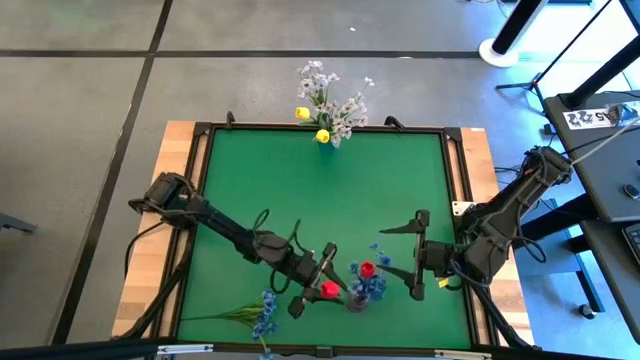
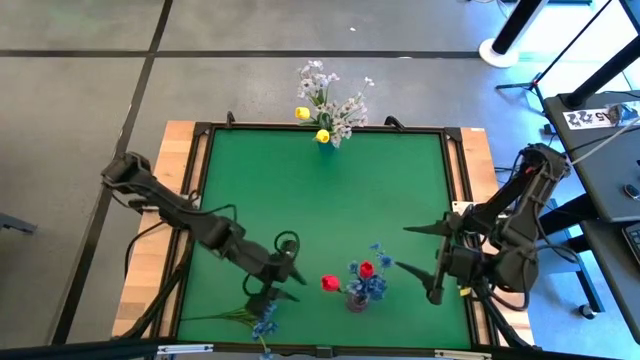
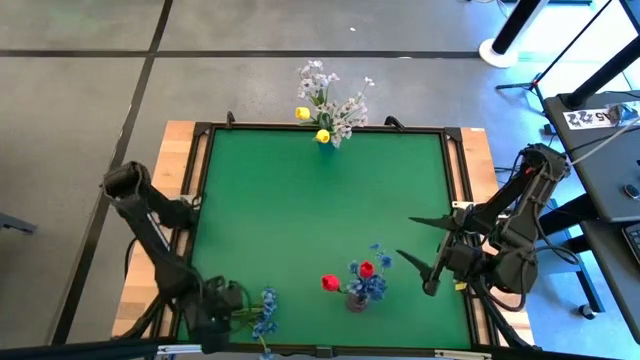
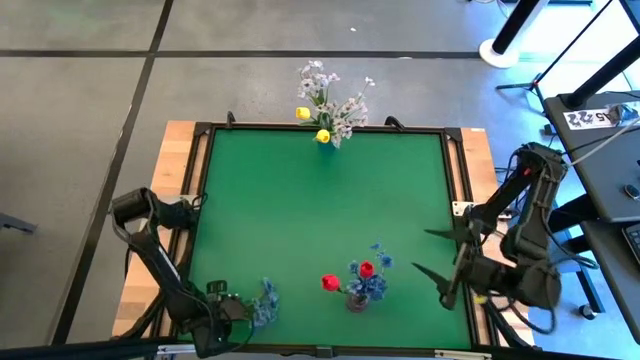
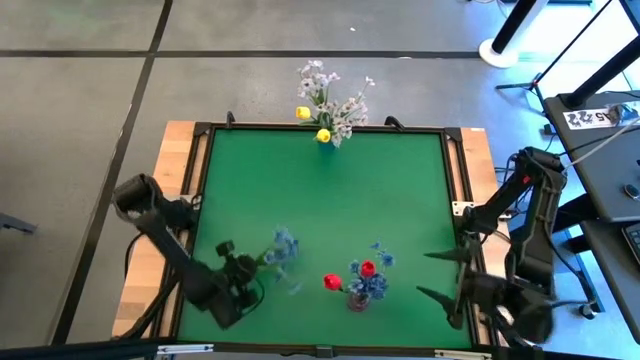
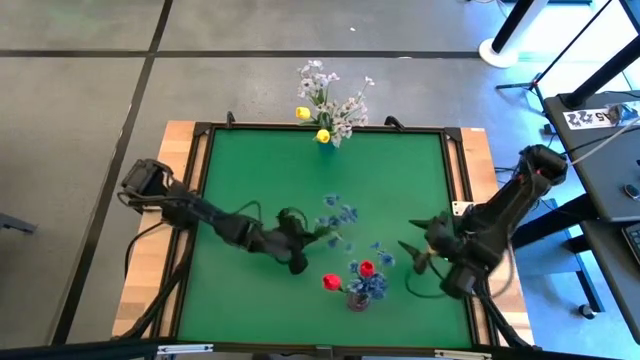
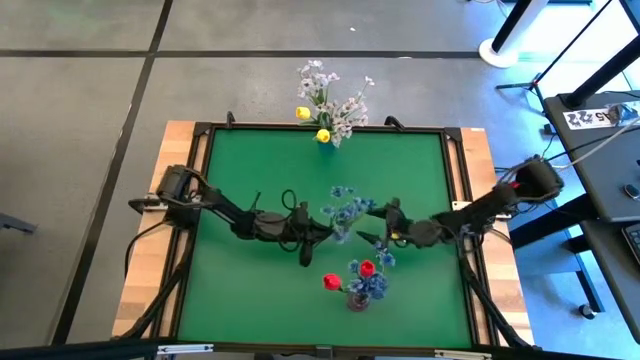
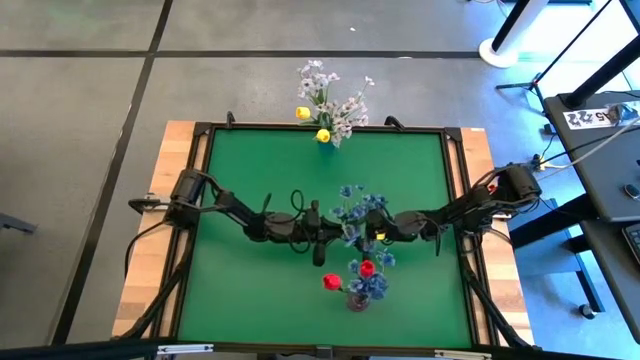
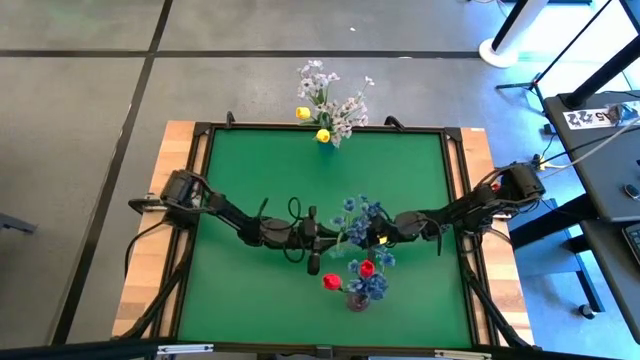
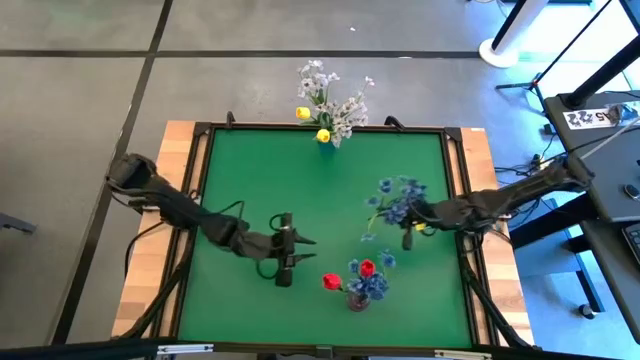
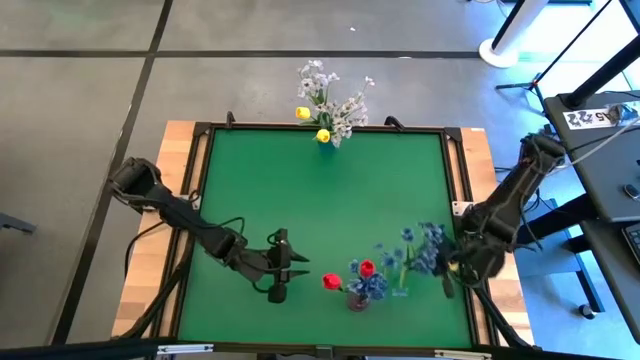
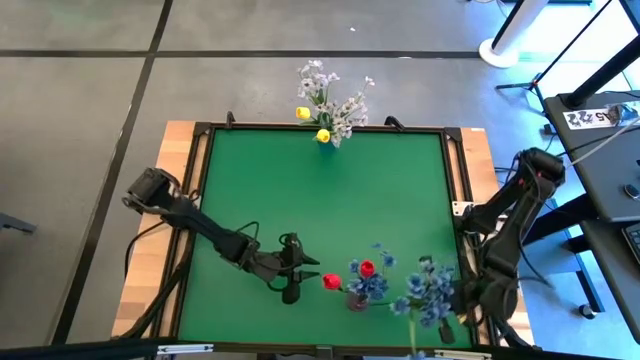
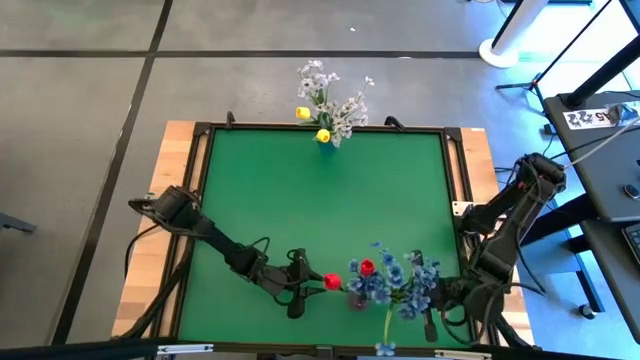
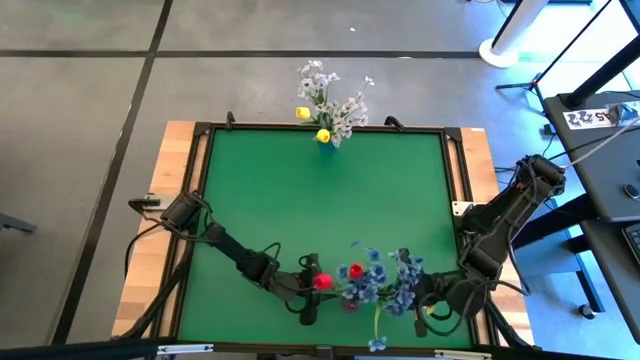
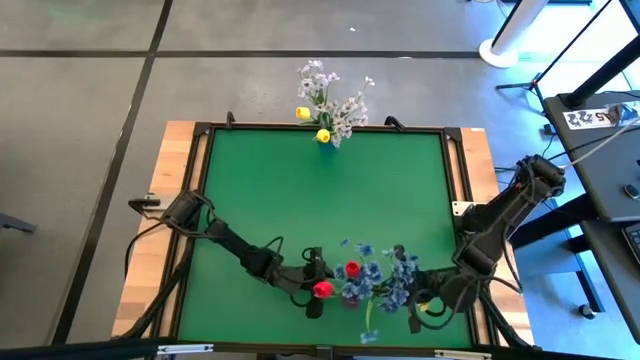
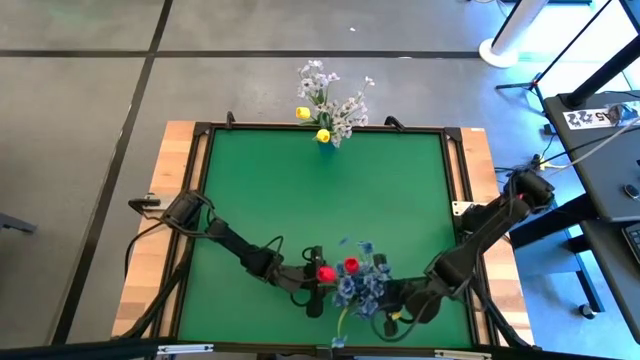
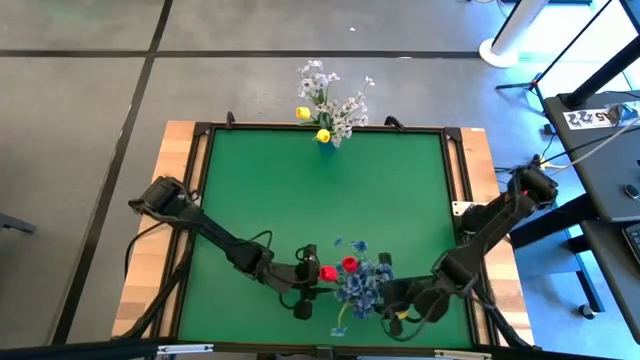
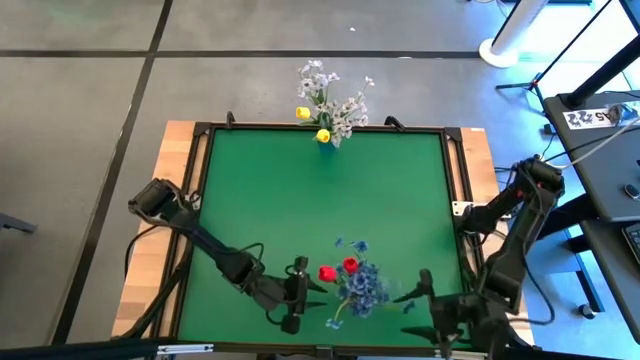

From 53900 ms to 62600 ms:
Task: Sort flowers into vase by color
Put the blue flowers into the purple flower vase

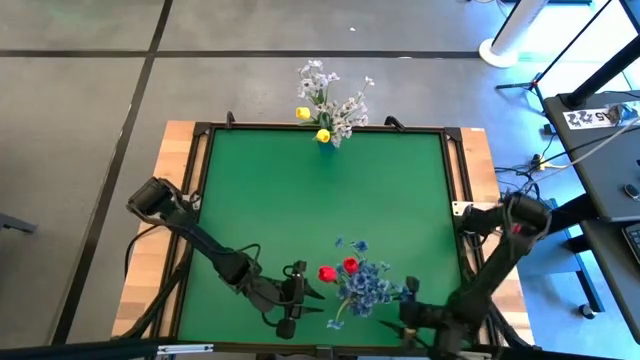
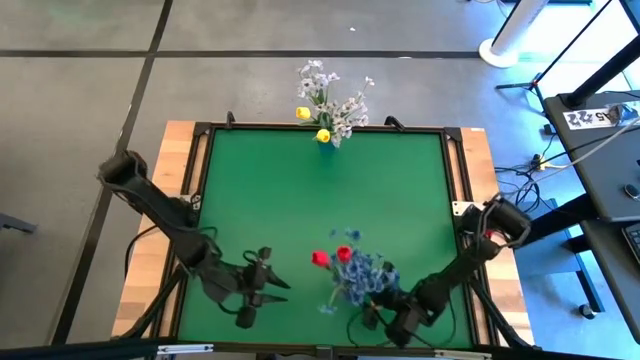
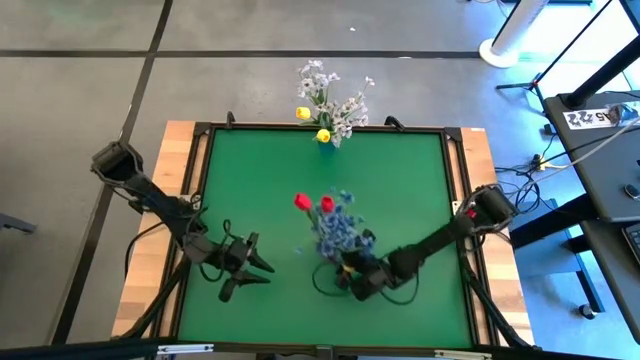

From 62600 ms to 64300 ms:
Move the purple flower vase to the center of the table

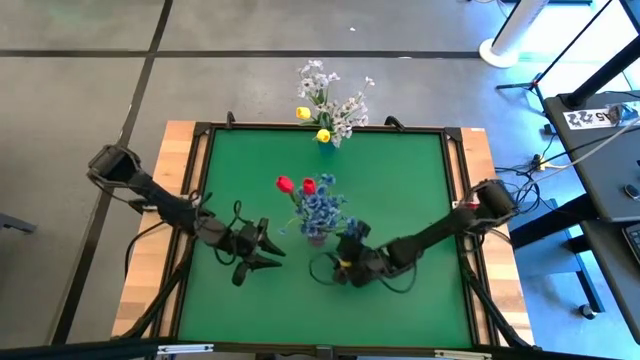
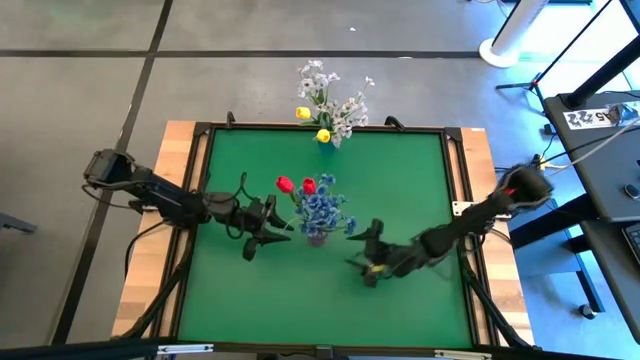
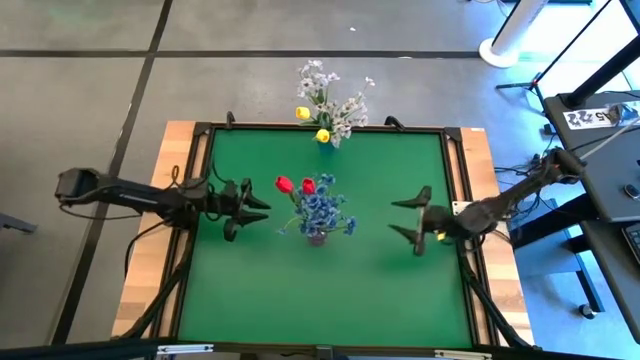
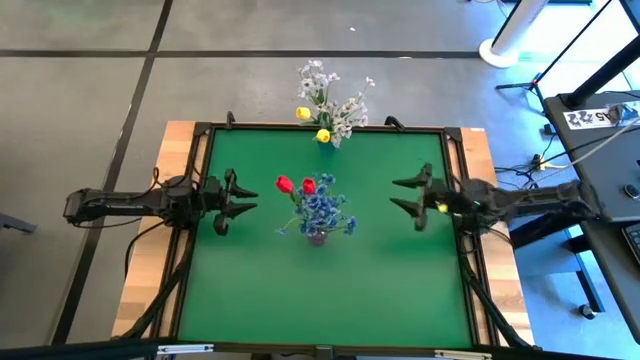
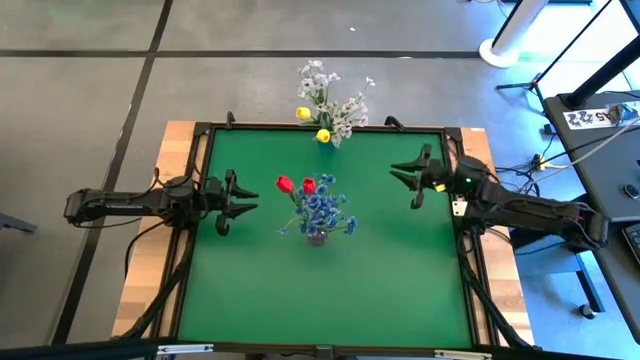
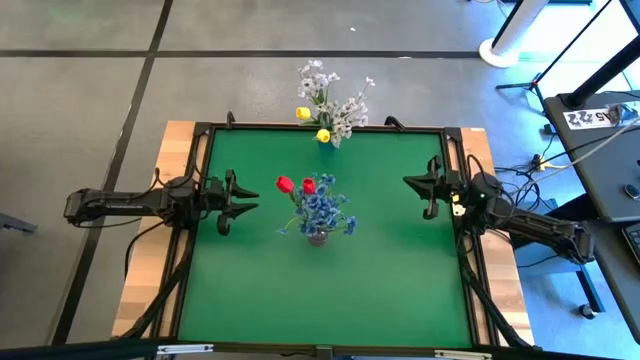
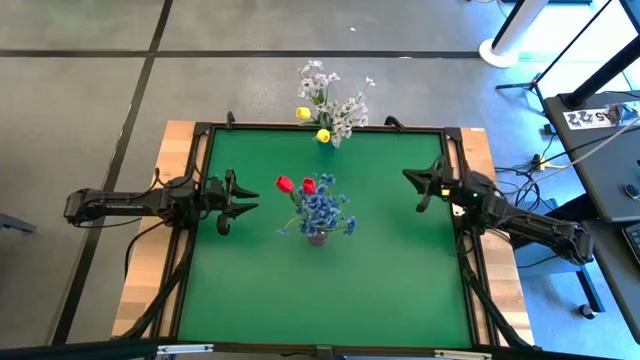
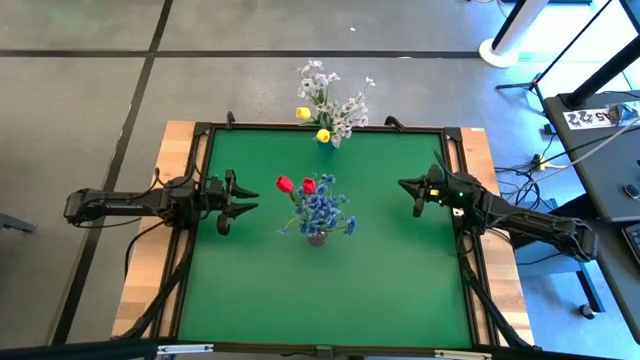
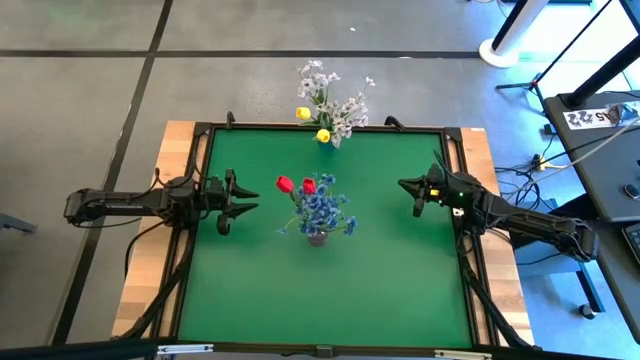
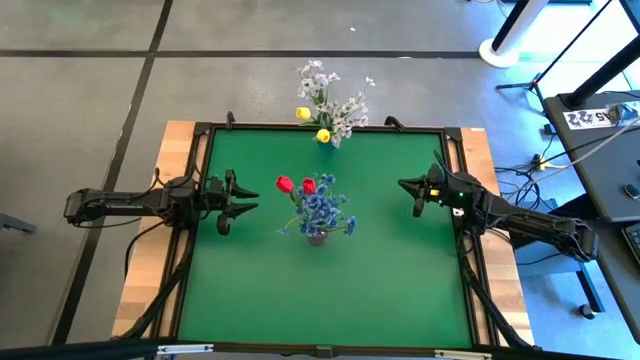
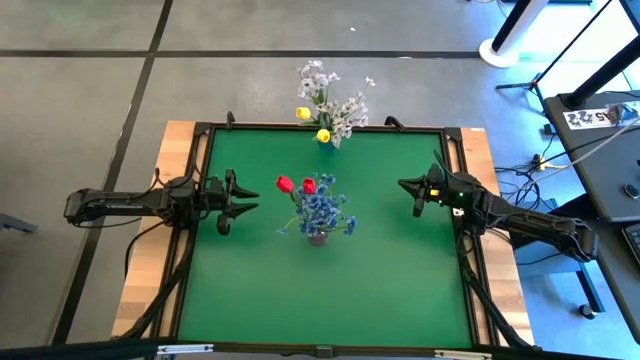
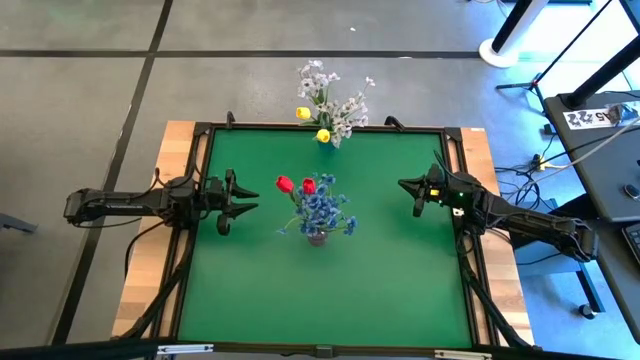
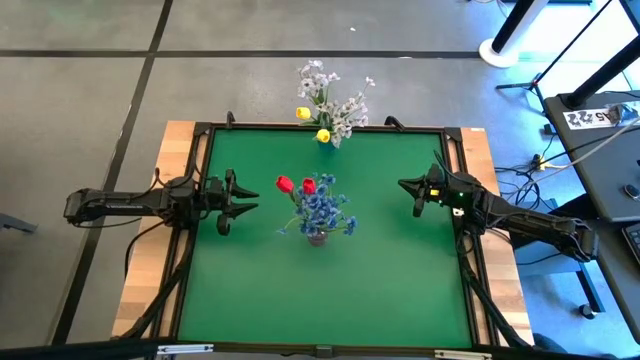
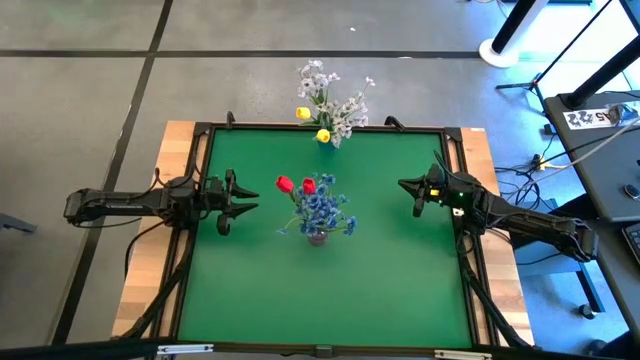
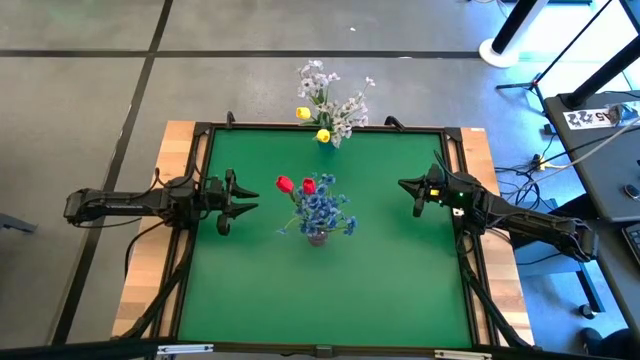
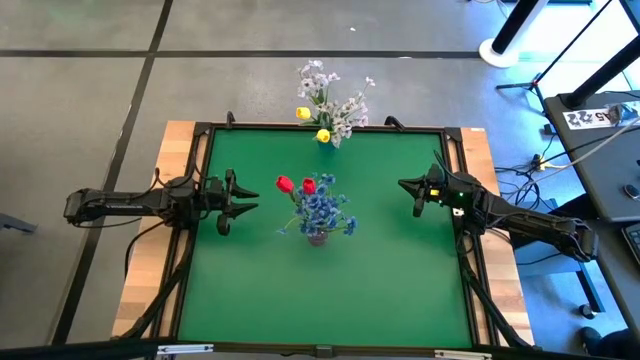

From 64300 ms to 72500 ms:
Return to Home Position

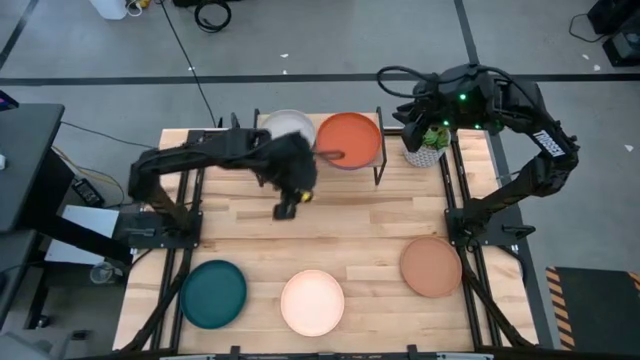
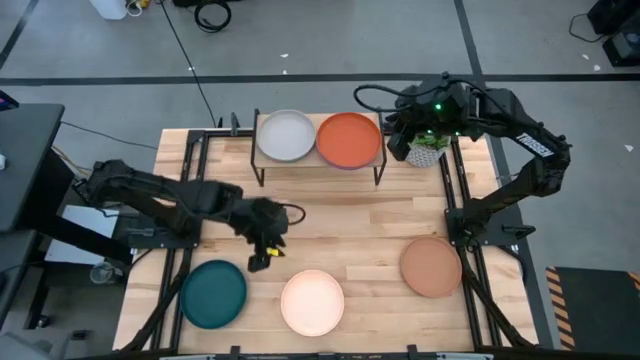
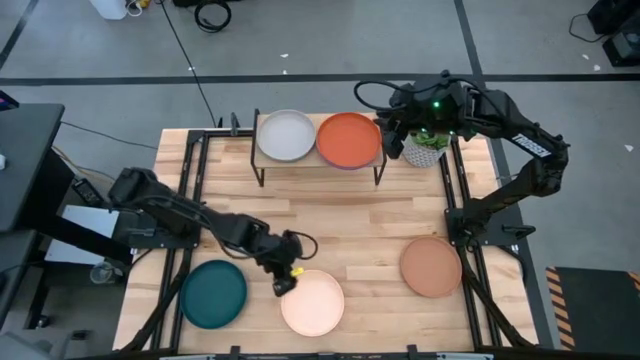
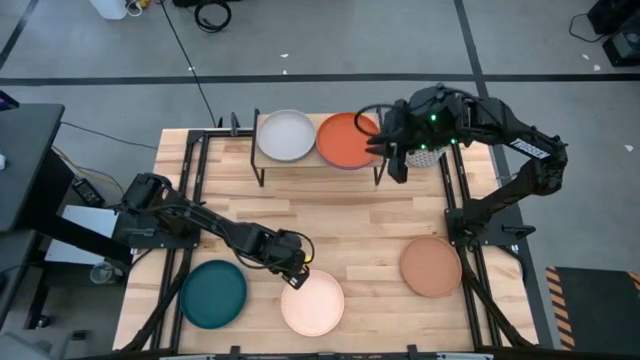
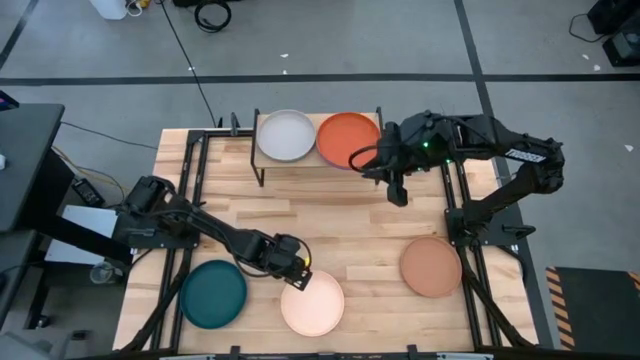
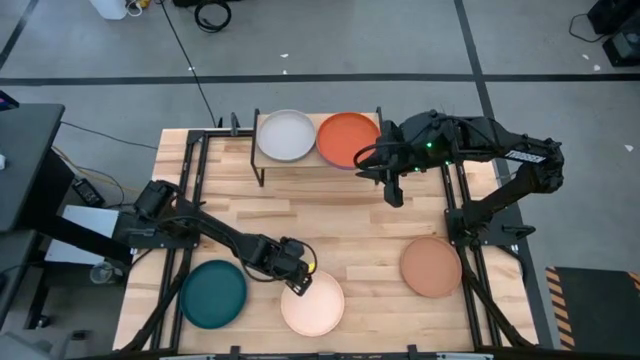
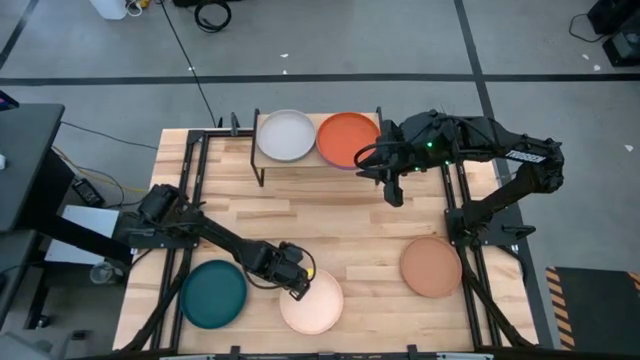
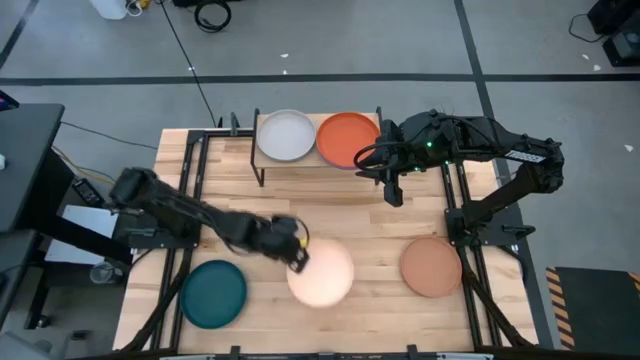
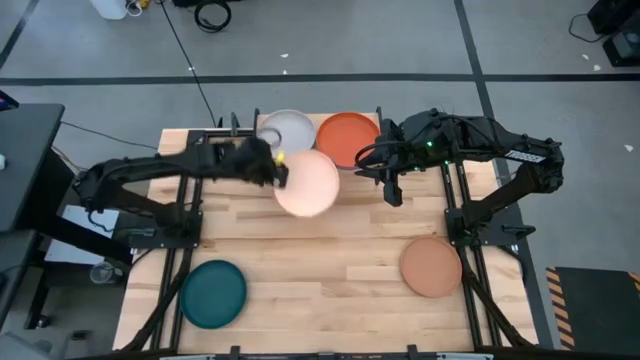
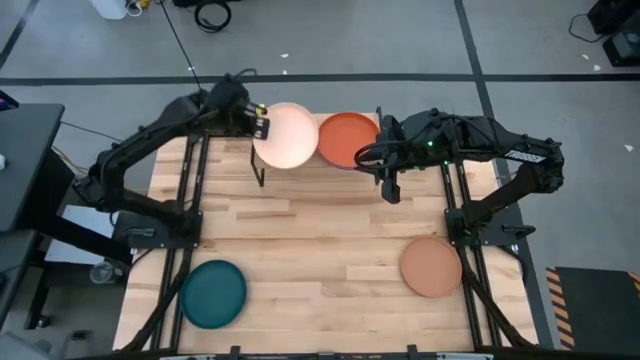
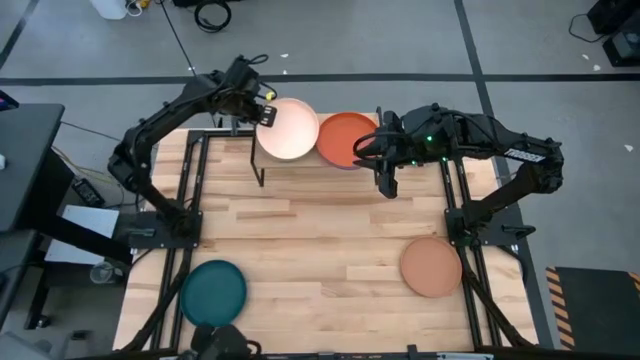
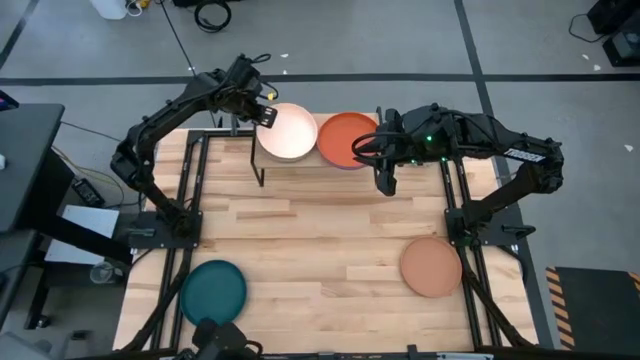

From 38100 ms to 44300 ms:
Task: Place and stack plates onto a shelf
Stack the light red plate on top of the gray plate on the shelf
